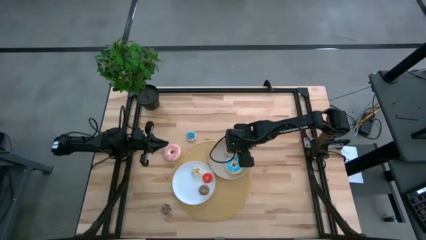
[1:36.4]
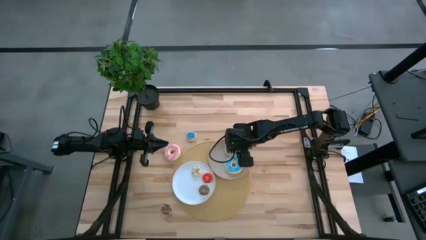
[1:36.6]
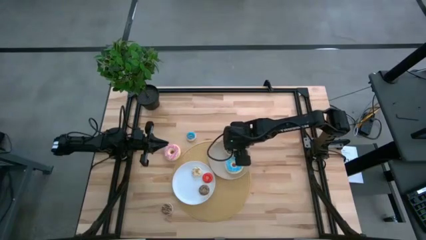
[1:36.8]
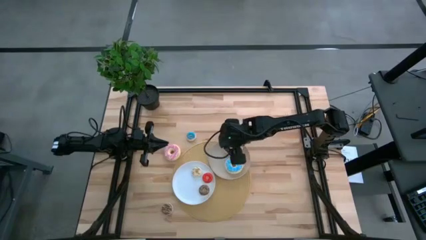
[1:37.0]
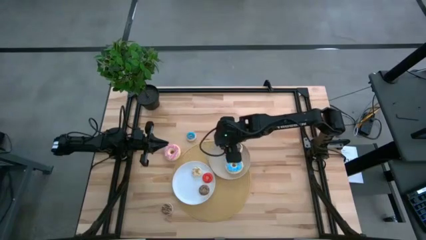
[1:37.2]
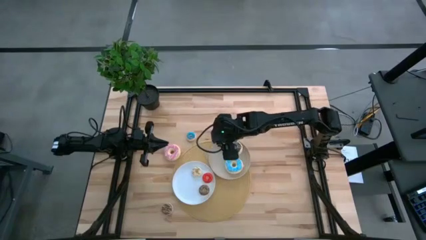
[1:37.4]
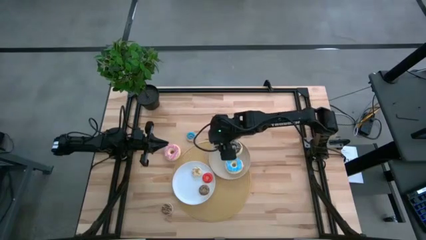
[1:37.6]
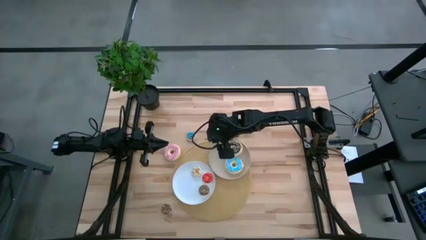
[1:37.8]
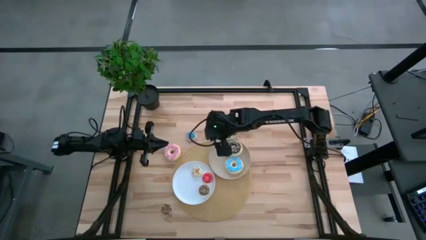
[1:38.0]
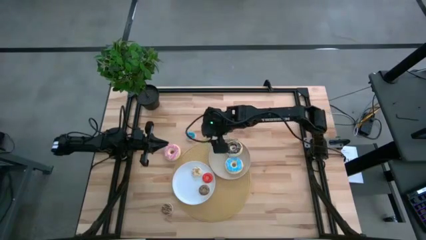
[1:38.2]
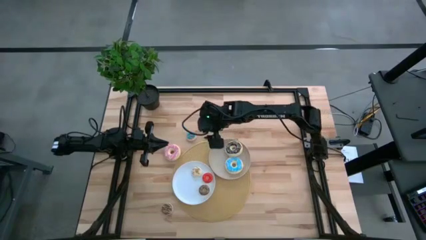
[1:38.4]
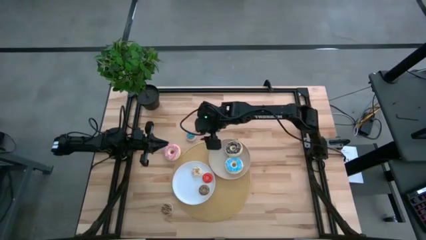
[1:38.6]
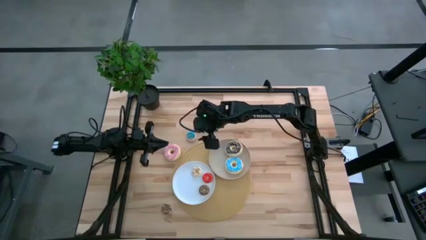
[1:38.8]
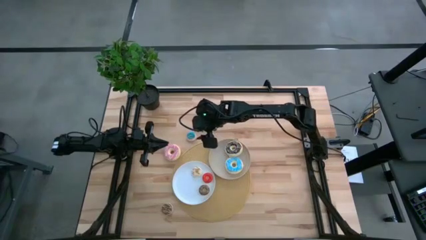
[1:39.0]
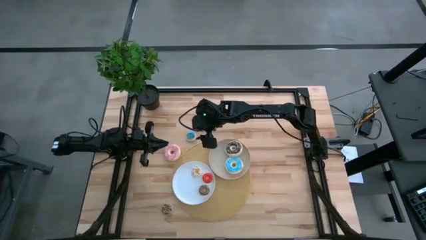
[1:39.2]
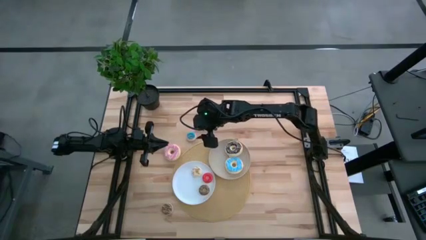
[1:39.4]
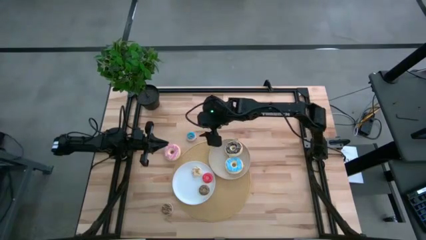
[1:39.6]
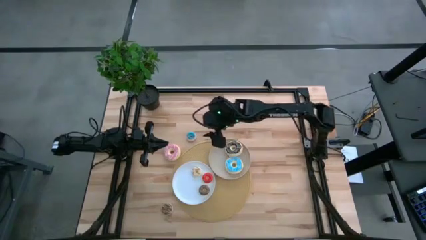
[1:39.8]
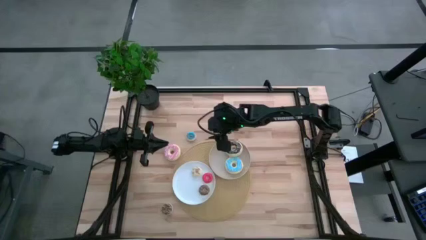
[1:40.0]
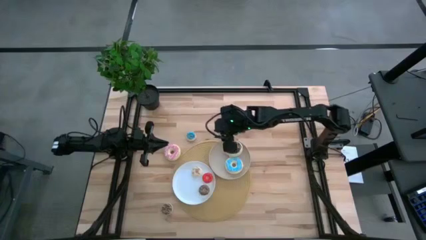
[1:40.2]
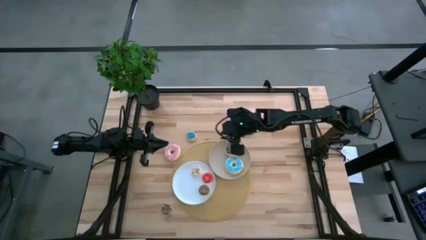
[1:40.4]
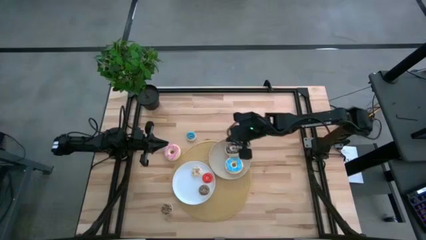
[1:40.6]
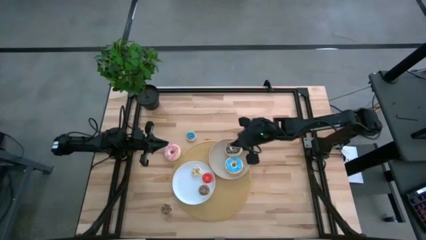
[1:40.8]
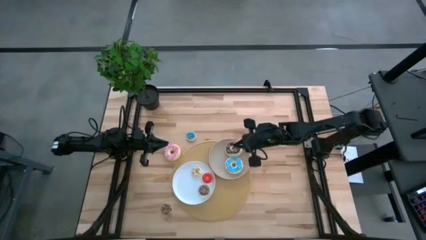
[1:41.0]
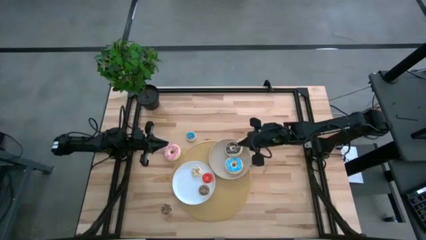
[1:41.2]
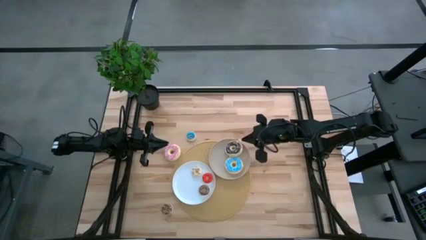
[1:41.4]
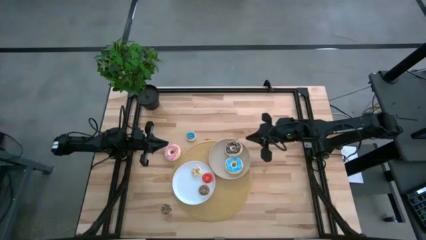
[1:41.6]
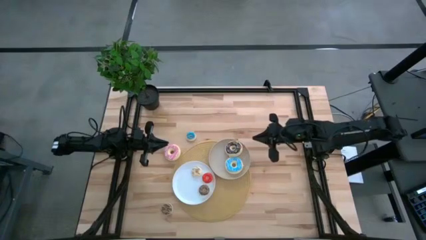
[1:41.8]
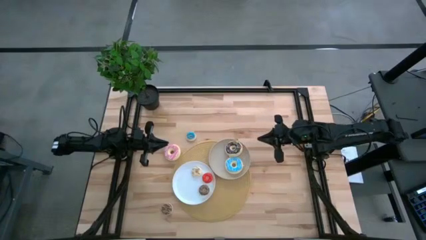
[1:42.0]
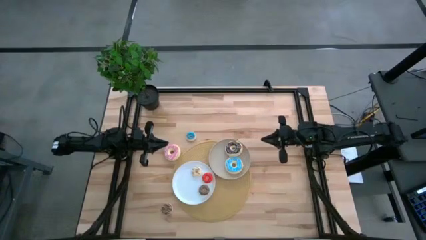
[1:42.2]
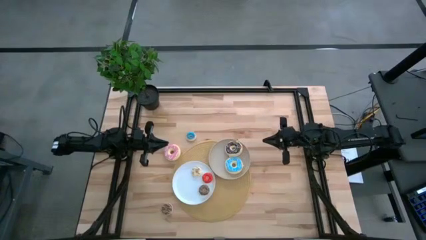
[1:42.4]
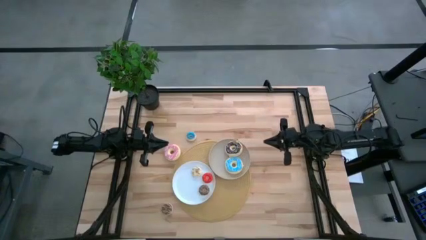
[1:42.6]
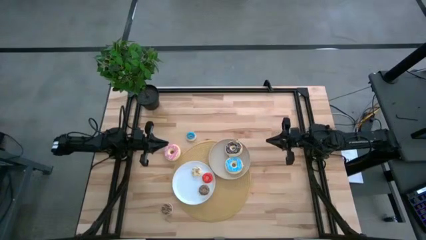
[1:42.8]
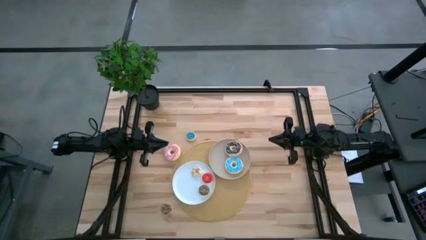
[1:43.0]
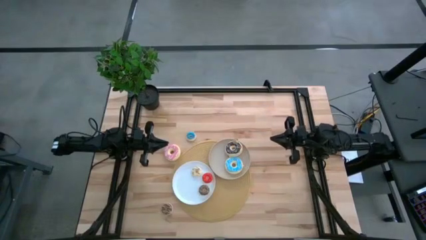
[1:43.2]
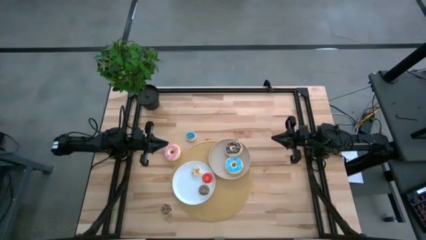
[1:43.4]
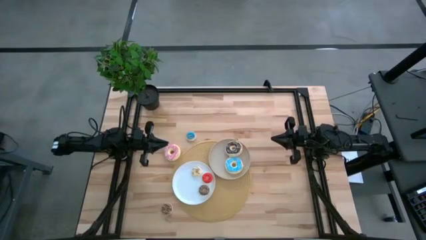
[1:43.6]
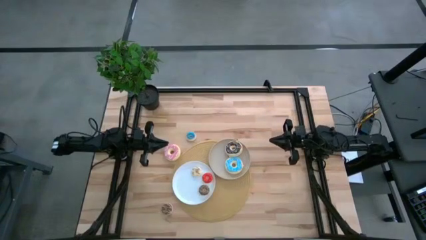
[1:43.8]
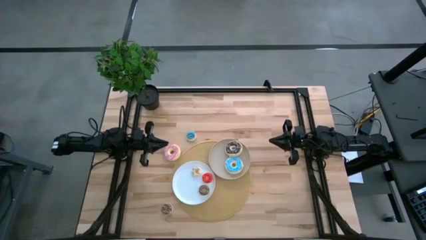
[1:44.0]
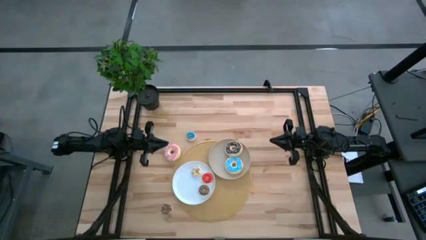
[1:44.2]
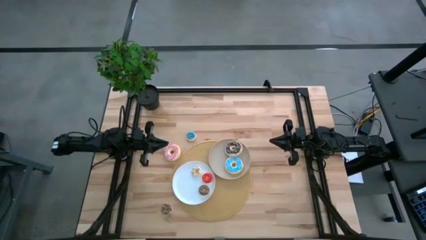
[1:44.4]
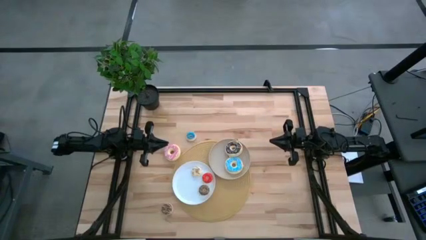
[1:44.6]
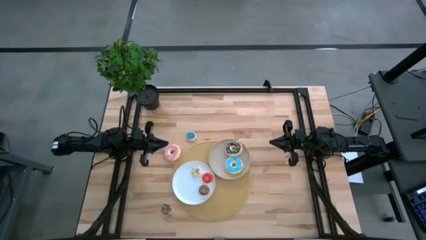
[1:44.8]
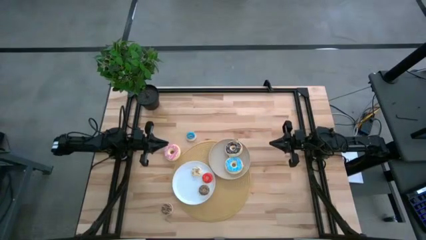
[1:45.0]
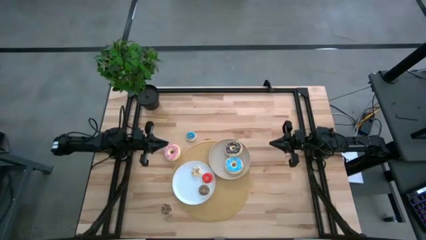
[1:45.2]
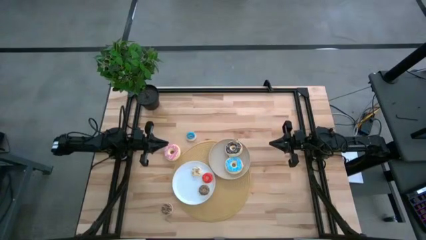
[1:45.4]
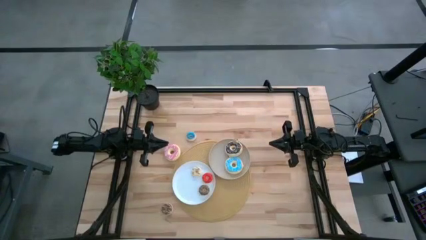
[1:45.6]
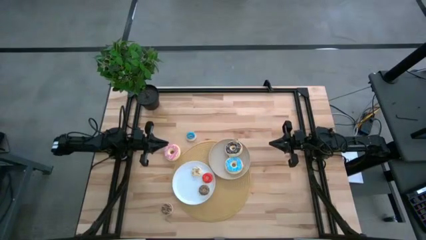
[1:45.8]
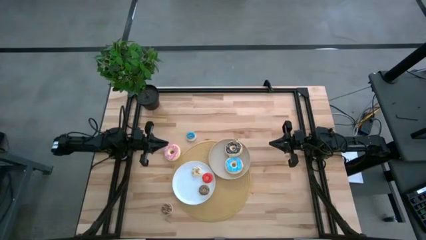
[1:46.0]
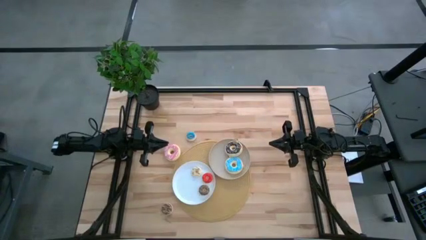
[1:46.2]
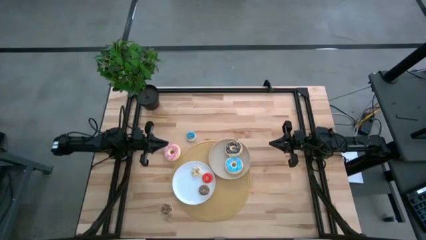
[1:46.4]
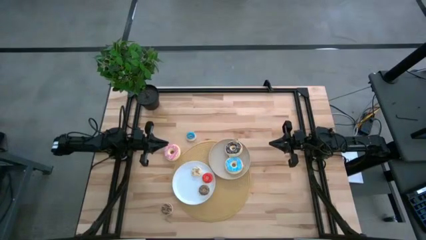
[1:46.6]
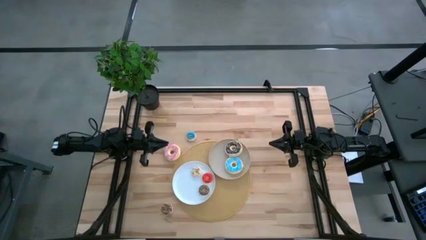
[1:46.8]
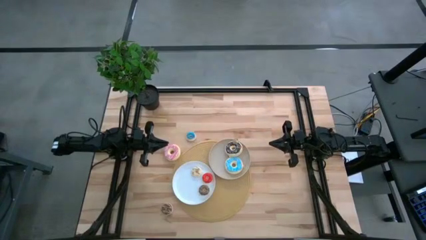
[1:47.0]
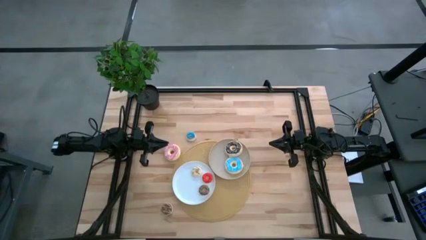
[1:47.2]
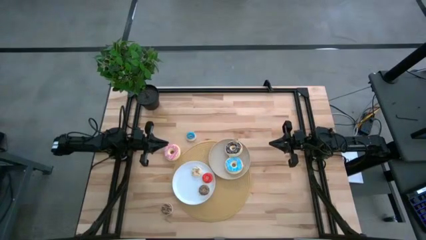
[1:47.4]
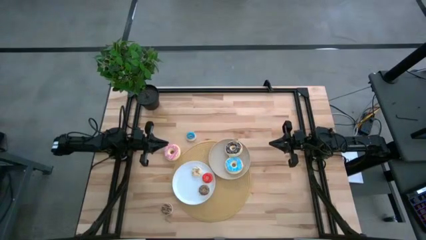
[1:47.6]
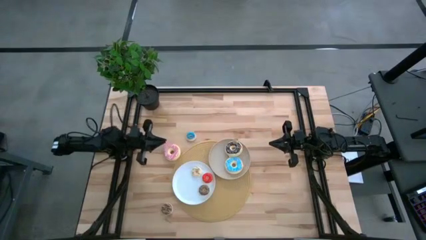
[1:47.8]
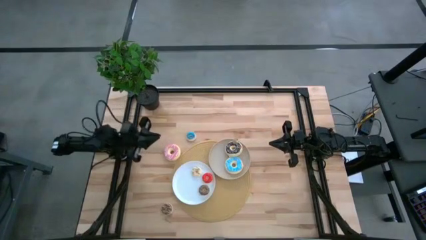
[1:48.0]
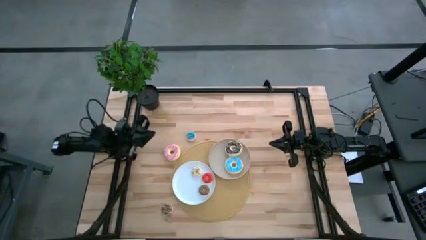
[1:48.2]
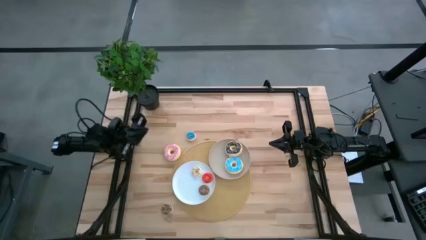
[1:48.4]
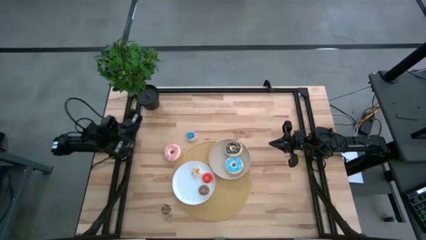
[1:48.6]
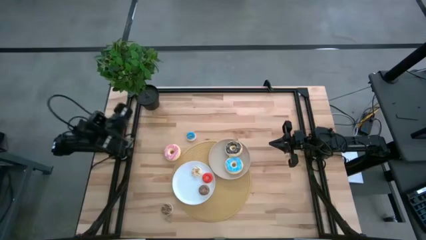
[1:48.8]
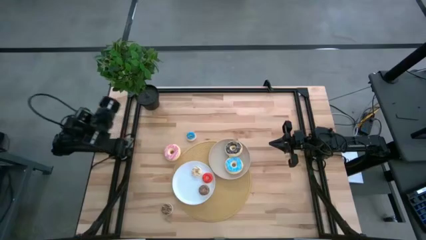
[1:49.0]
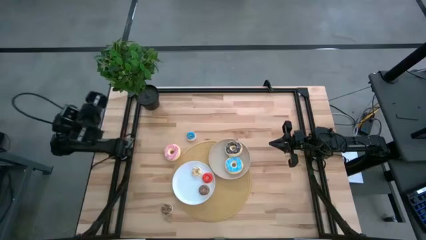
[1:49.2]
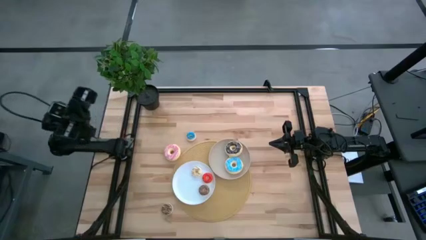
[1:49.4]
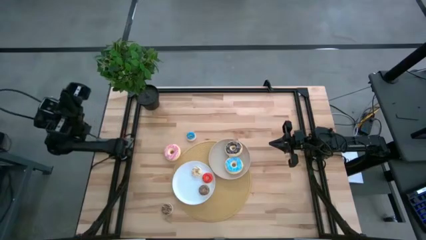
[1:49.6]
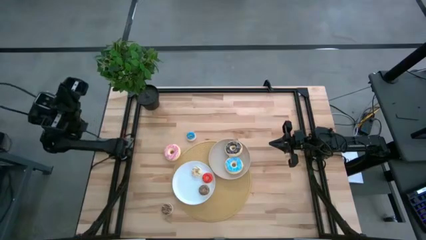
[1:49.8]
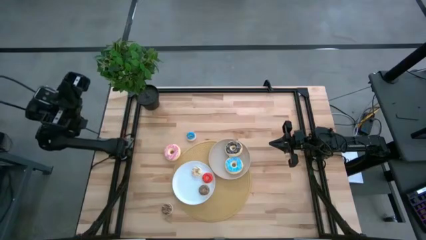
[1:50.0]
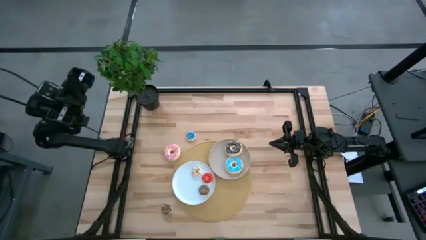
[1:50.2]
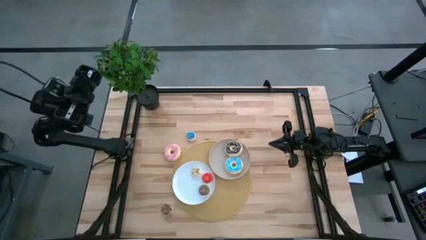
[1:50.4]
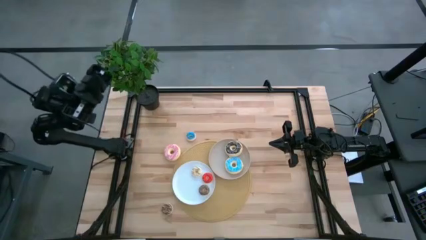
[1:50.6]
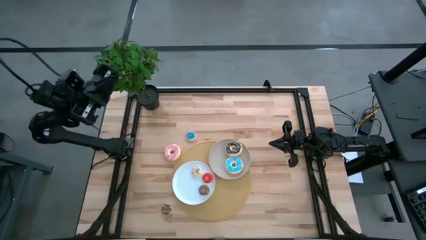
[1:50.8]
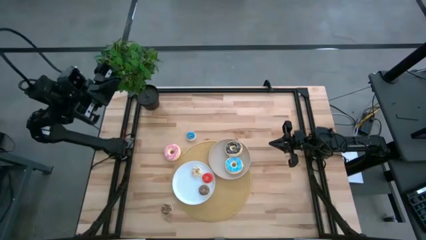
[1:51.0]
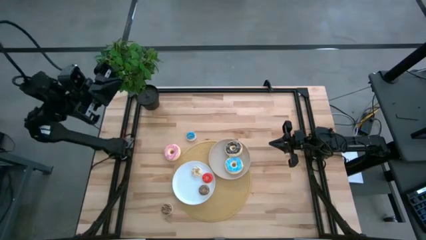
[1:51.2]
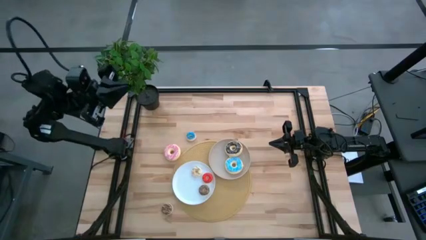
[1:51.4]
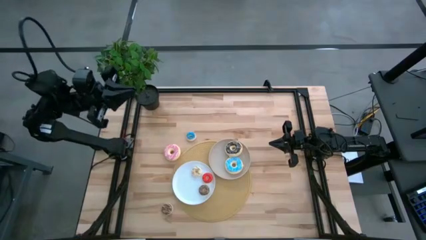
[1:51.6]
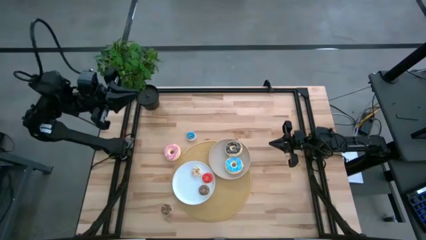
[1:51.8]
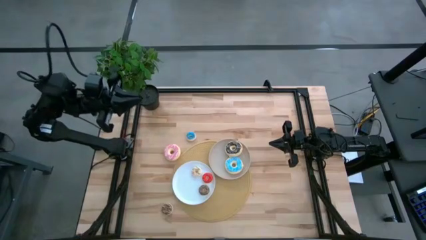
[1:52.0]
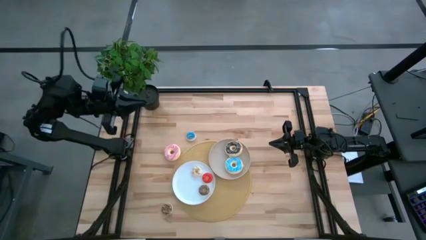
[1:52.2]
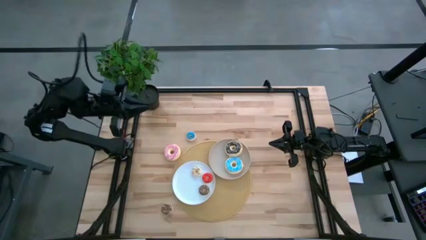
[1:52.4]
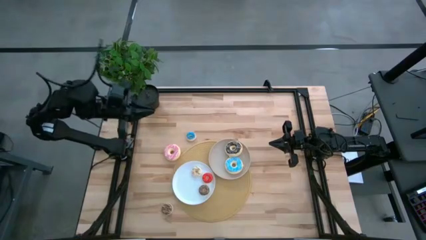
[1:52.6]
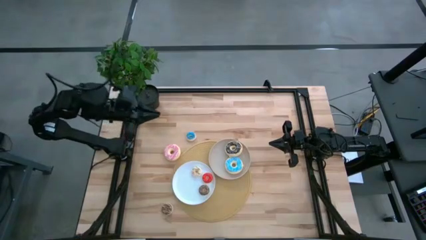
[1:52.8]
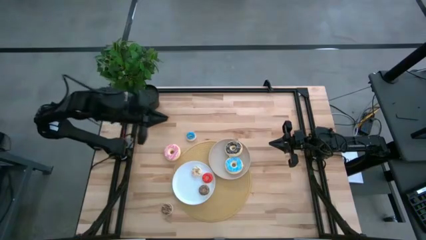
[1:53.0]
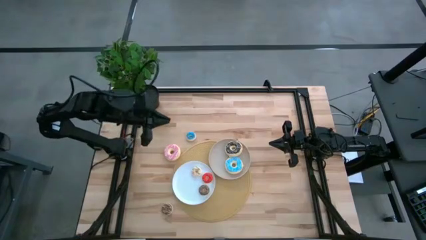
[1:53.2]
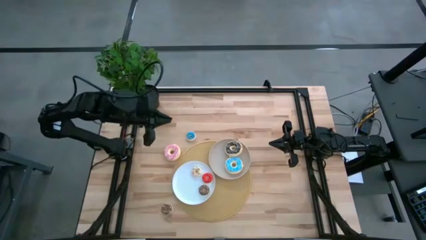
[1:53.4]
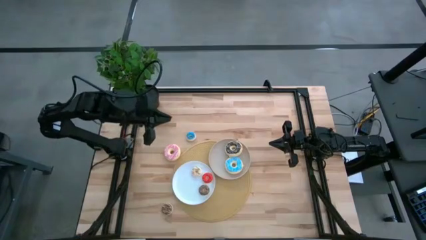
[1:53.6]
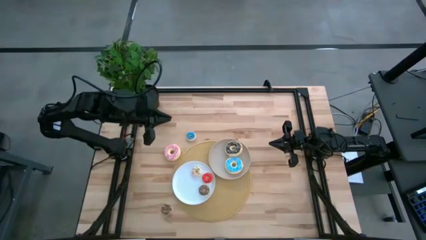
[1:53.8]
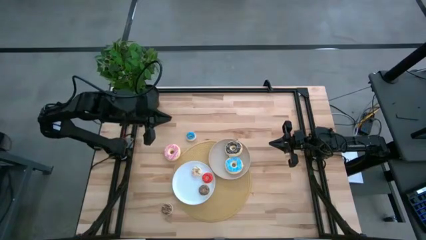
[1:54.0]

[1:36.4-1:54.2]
Task: Pick & Place donuts
Put the large pink donut on the gray plate
